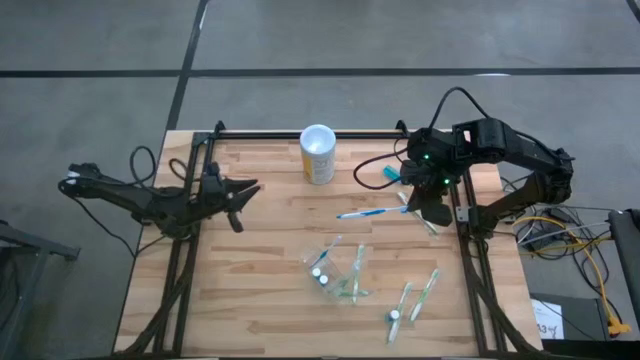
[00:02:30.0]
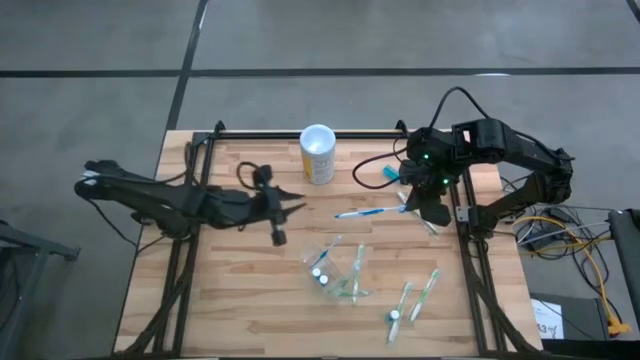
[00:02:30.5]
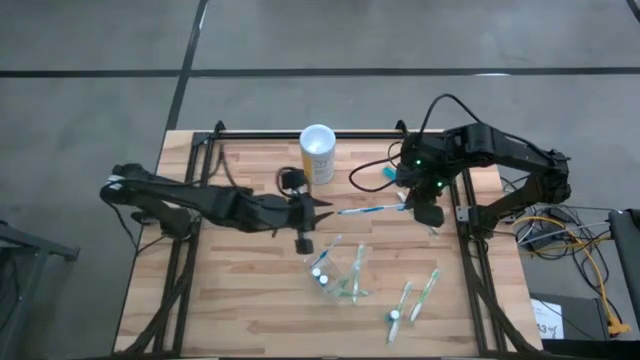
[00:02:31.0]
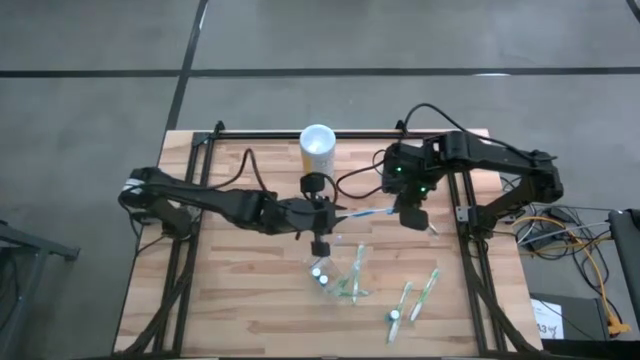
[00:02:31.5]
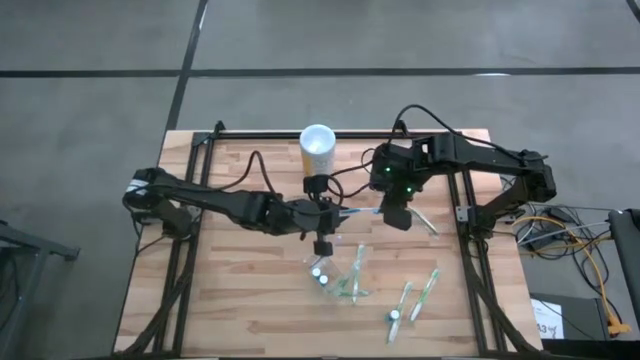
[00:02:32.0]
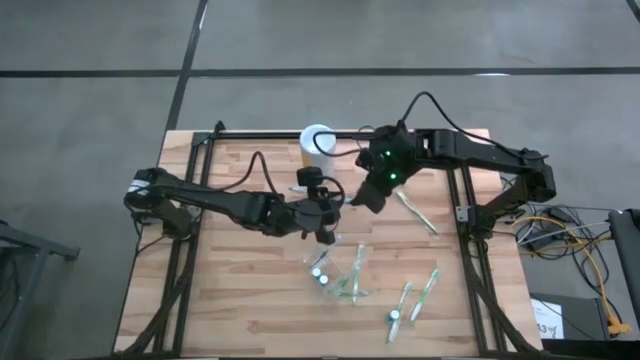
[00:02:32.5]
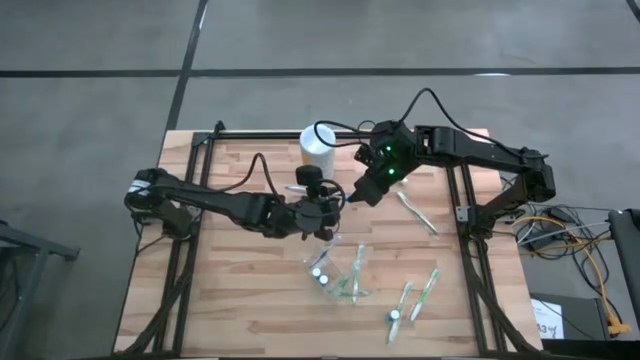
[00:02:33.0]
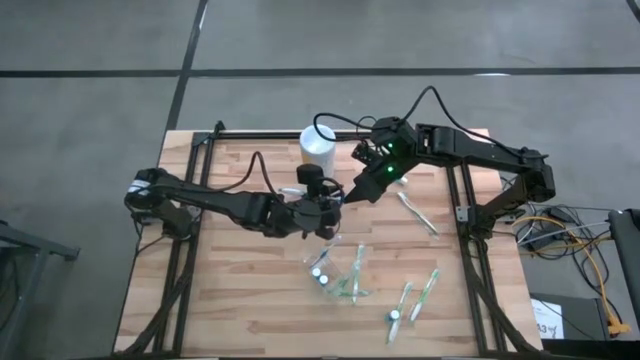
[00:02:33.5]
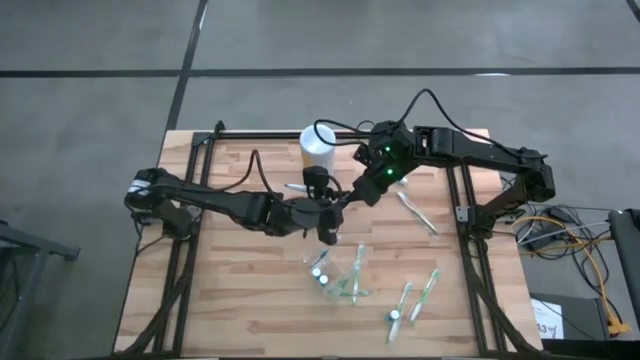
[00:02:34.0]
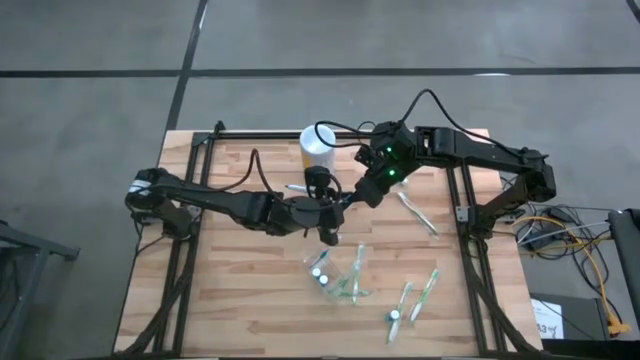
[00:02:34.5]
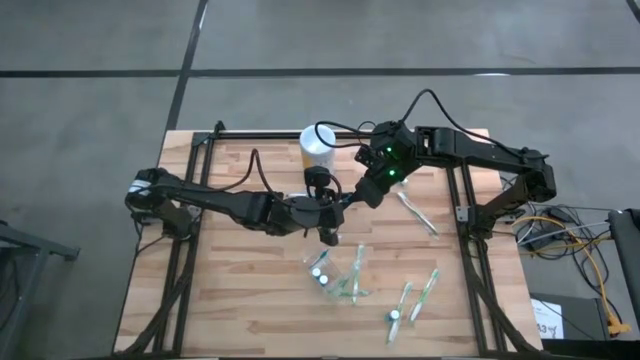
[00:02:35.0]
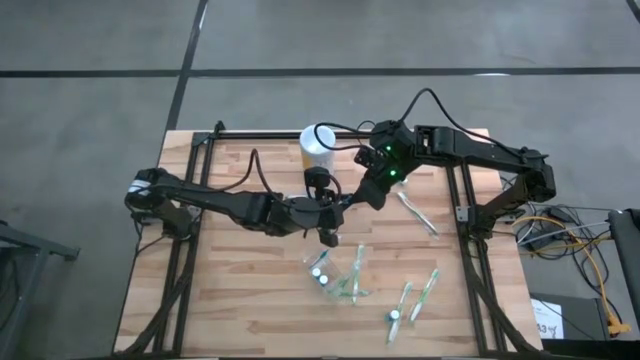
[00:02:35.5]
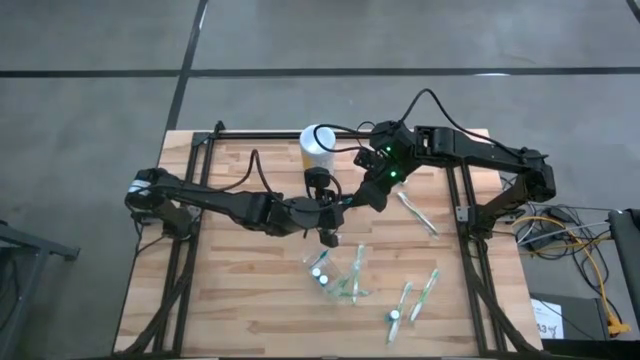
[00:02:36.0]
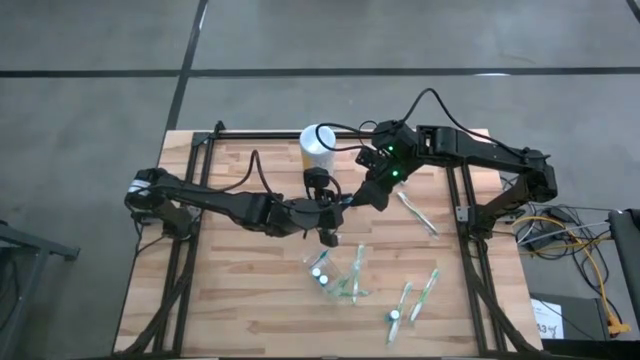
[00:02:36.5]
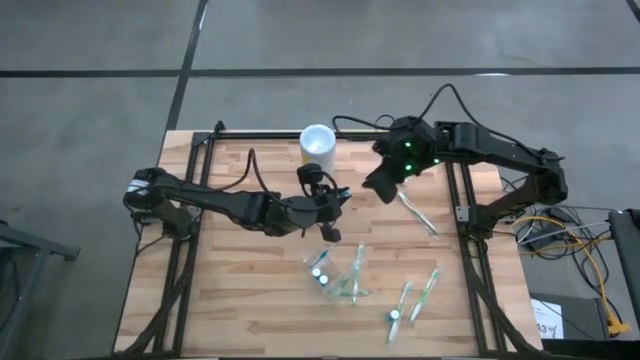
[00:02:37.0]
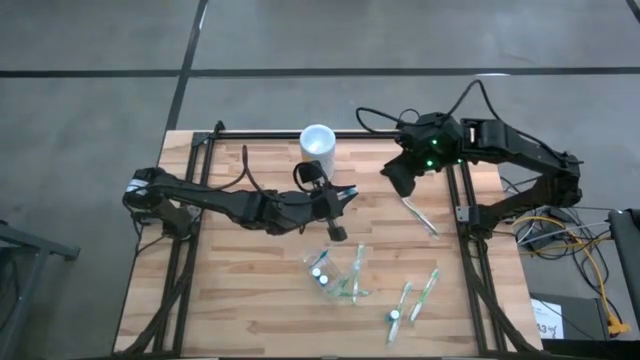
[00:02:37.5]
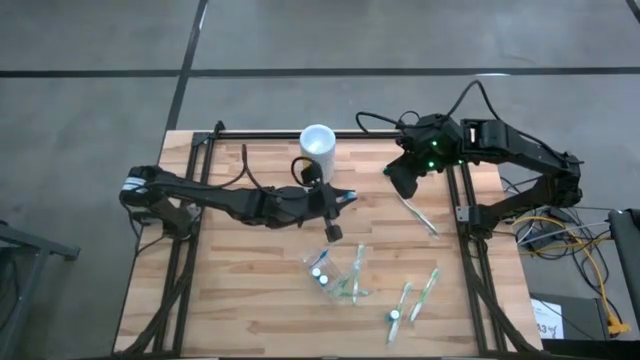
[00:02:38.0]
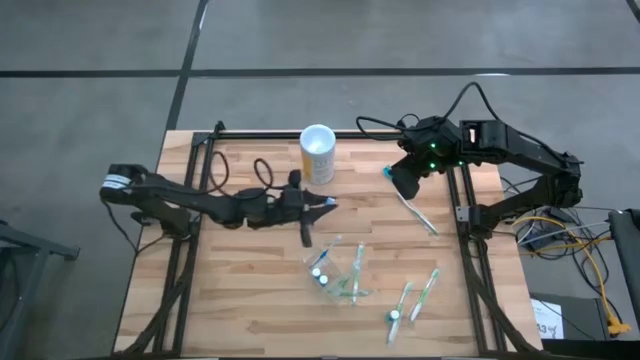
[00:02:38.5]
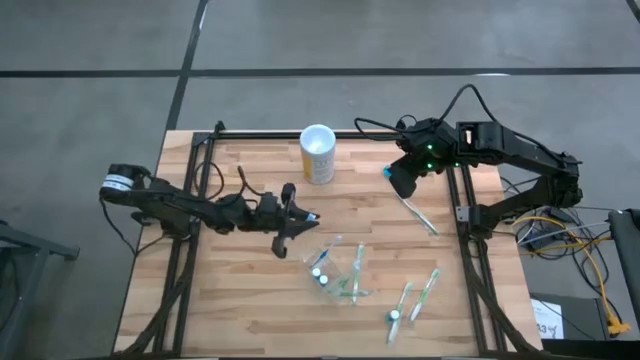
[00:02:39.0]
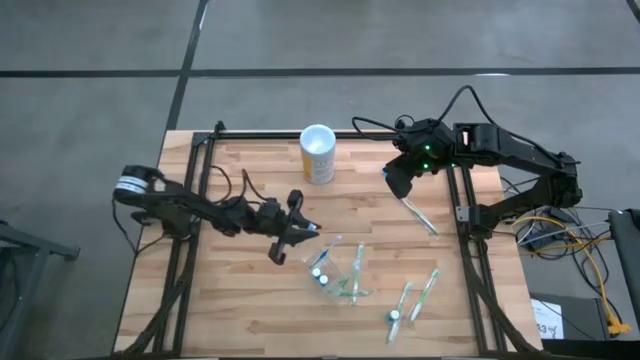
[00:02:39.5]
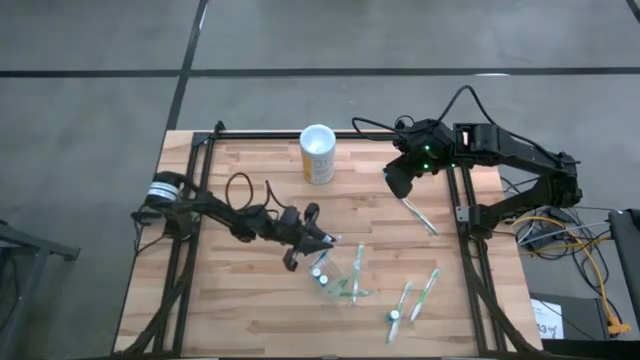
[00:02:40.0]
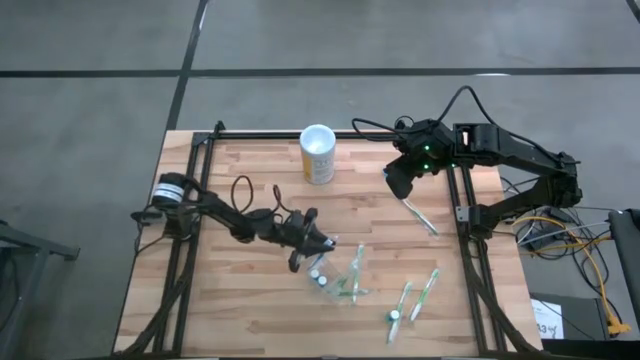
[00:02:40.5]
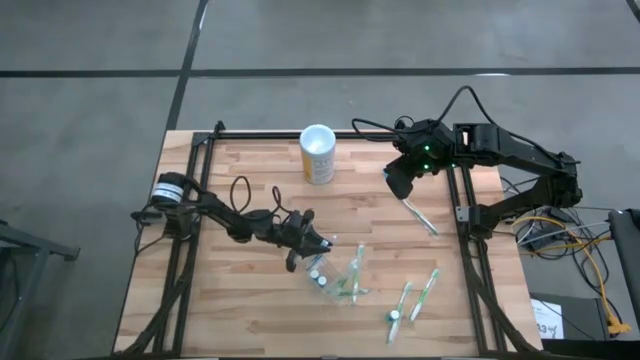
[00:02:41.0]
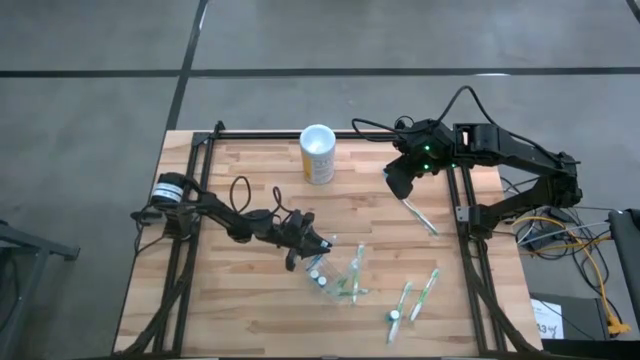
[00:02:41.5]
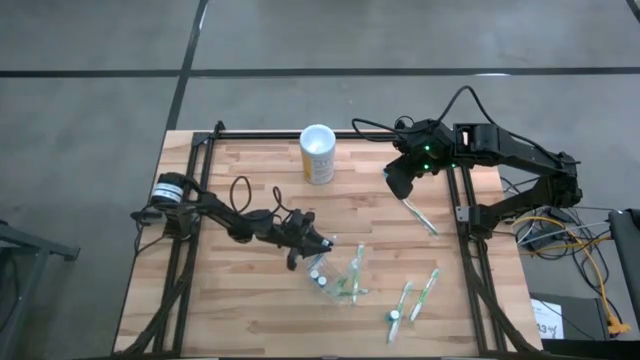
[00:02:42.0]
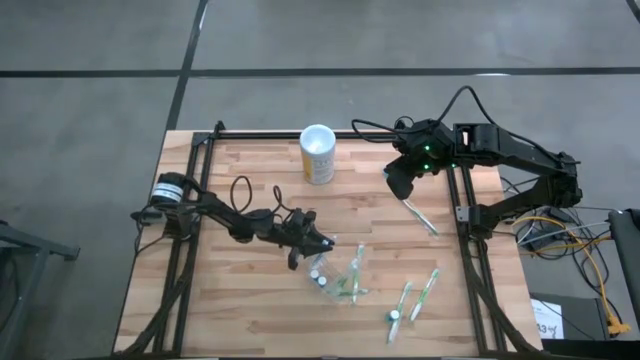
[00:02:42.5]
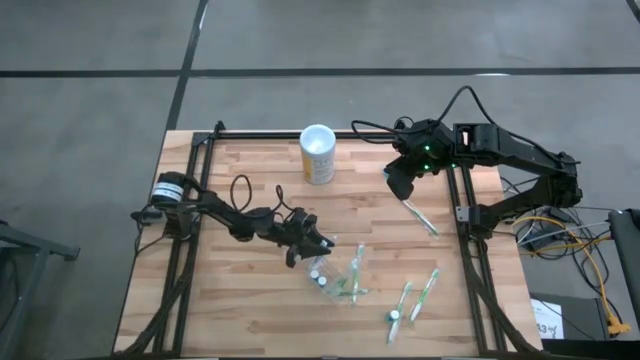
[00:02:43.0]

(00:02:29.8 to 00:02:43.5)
Task: Pick & Place toothbrushing station
Put the blue toothbrush into the left section of the transparent organizer

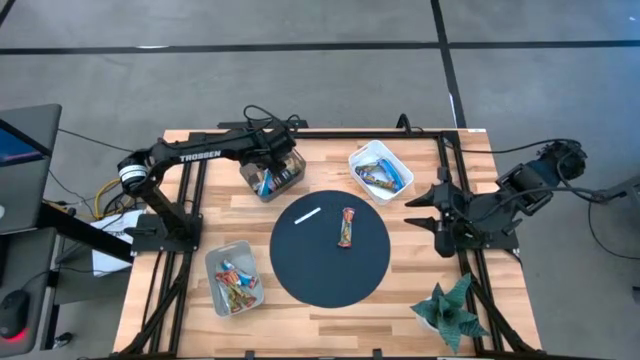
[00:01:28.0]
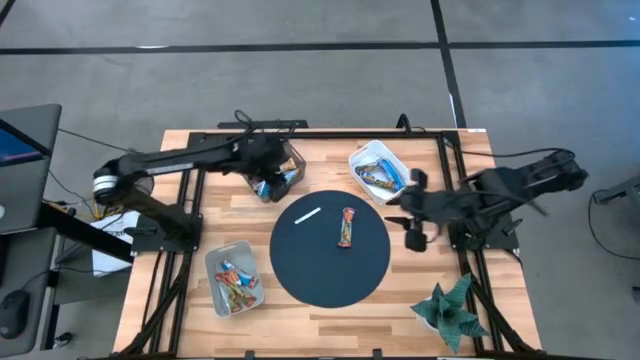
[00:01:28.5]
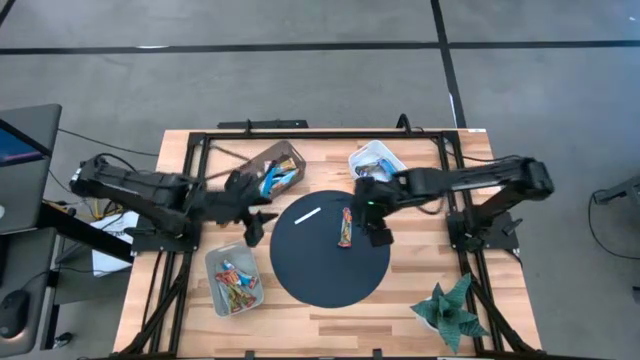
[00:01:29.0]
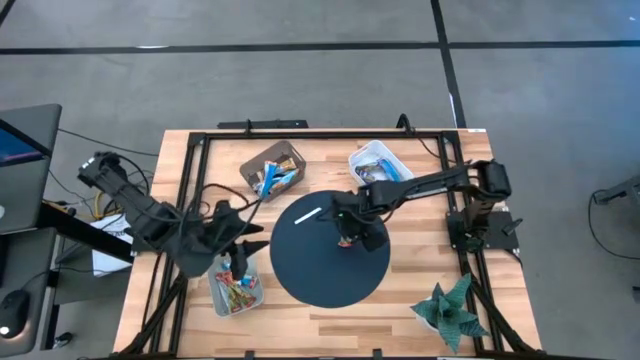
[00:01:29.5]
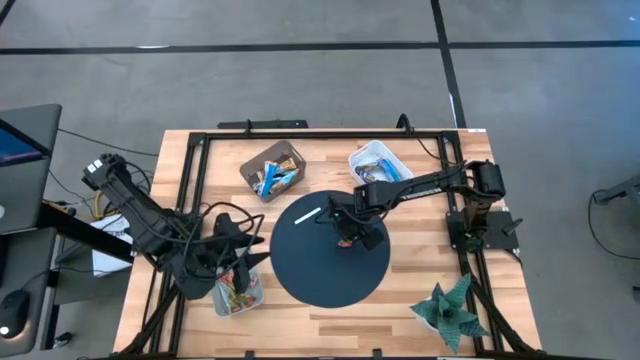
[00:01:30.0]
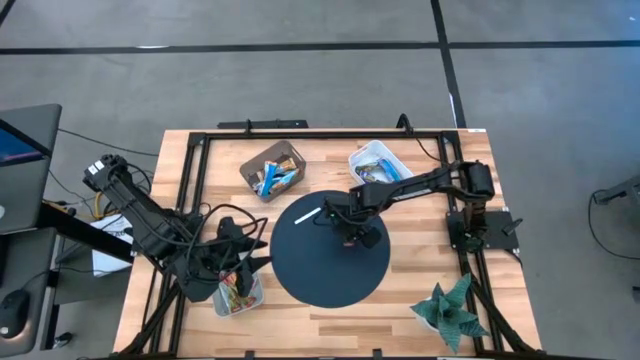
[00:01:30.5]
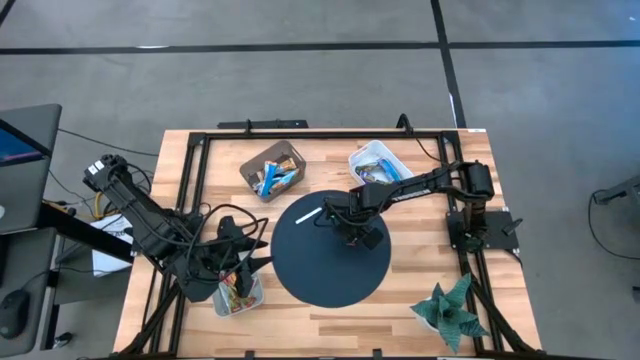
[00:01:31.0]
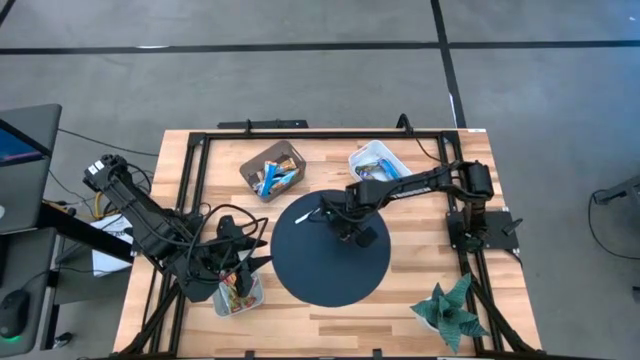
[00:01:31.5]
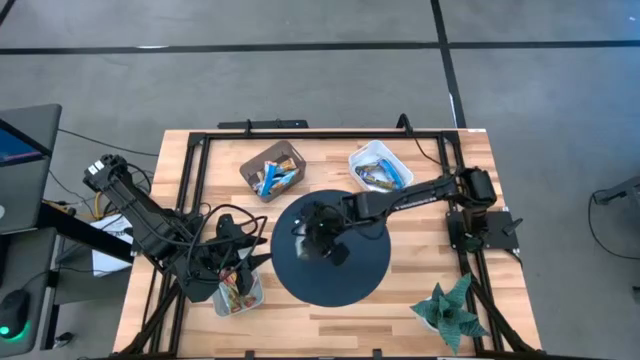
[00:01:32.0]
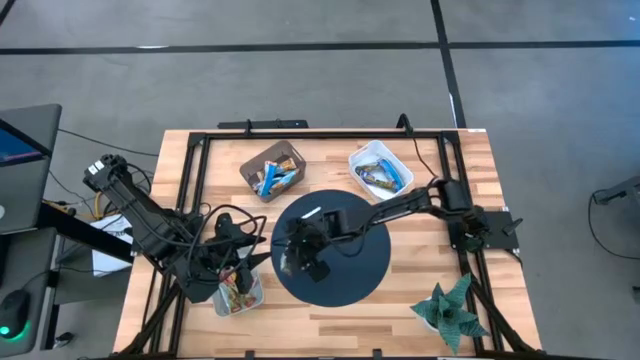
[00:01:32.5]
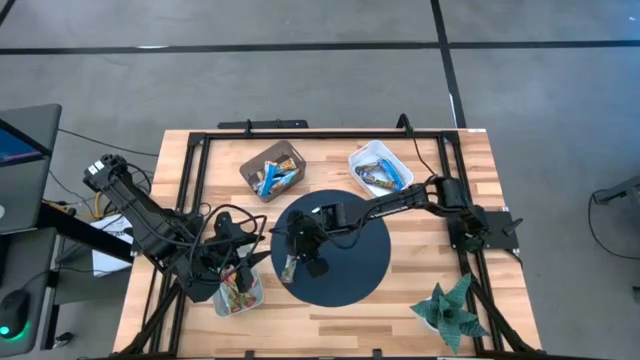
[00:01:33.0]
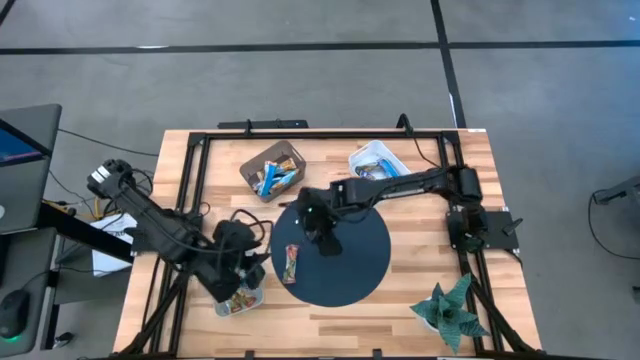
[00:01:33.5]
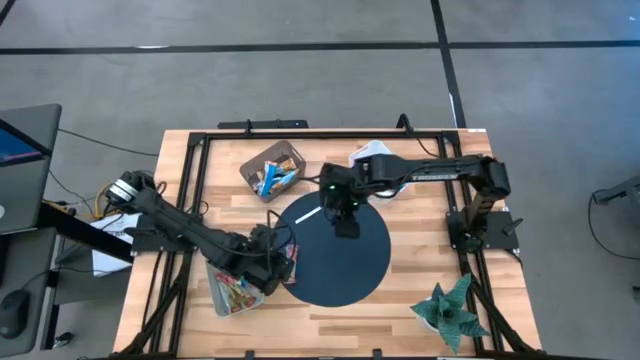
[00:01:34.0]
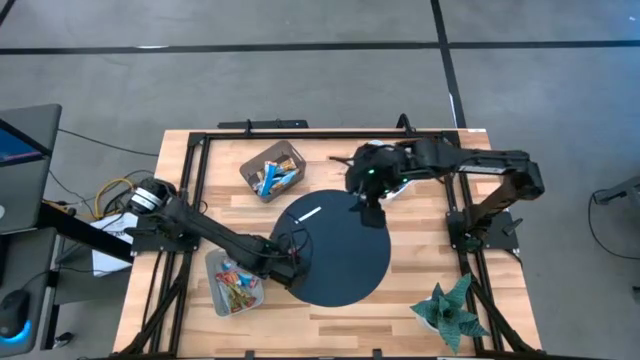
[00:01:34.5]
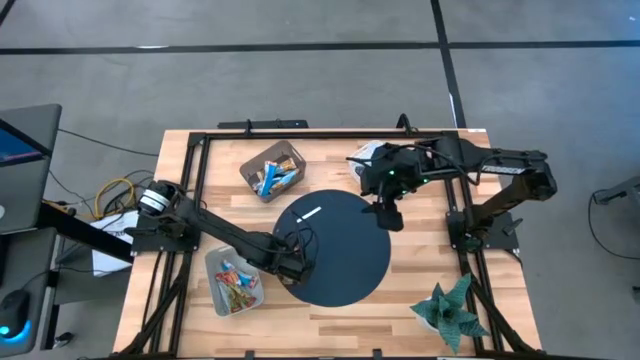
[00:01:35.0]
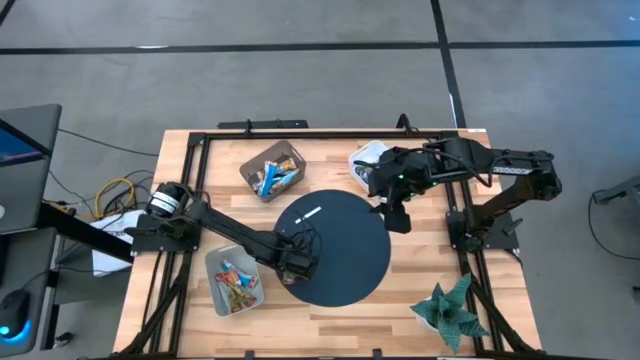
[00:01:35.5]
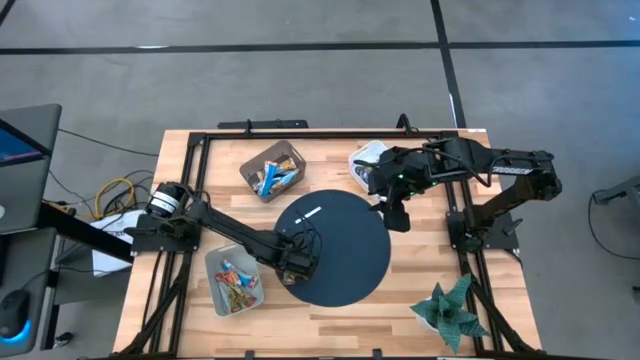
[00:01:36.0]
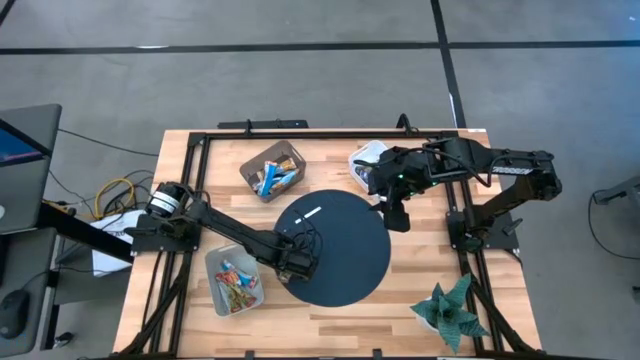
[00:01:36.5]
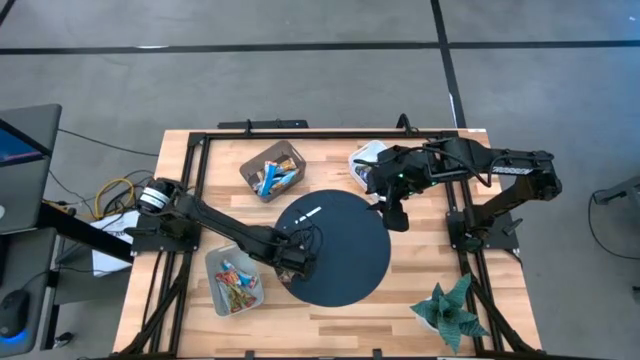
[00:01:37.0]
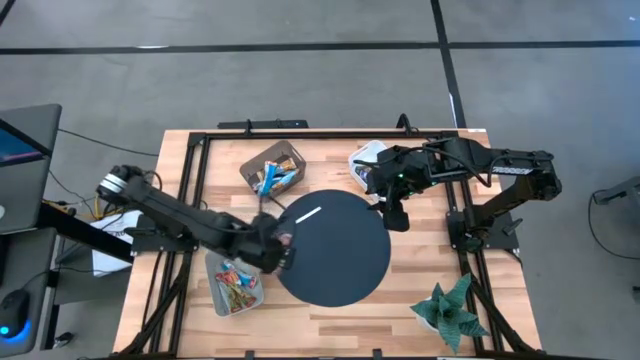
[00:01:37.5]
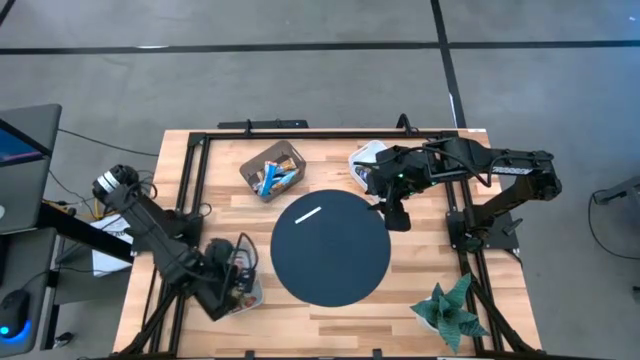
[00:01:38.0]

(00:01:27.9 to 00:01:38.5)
Task: Pick and place Granola Bars by type
Put the red granola bar into the gray bin
